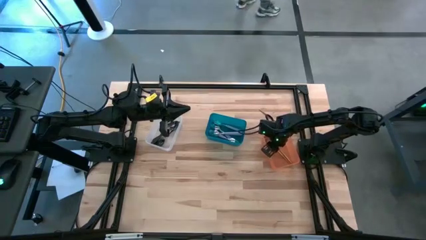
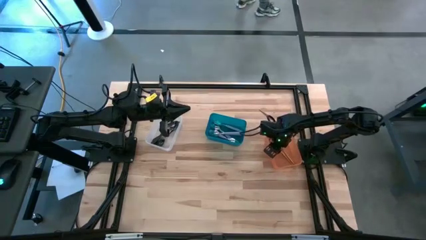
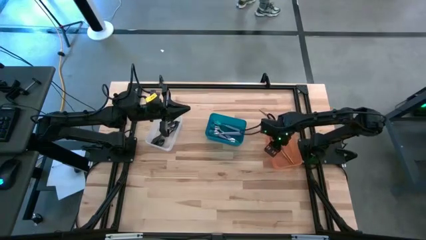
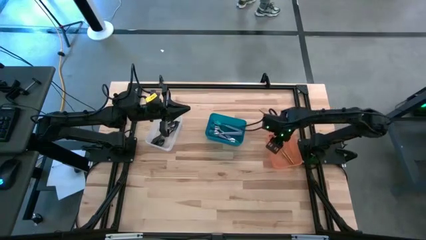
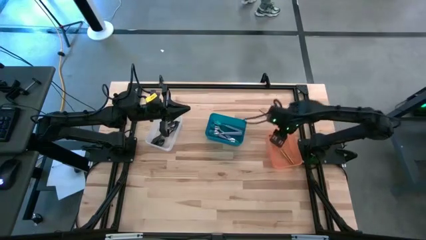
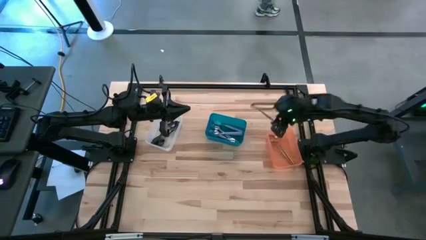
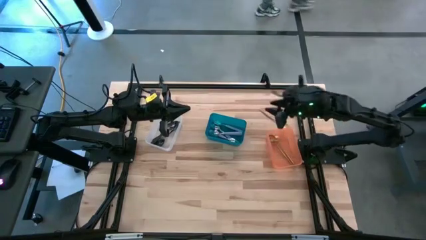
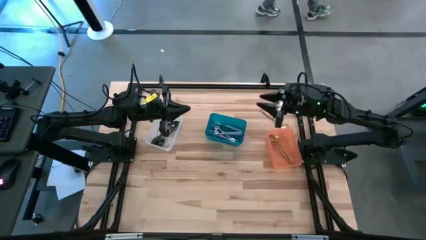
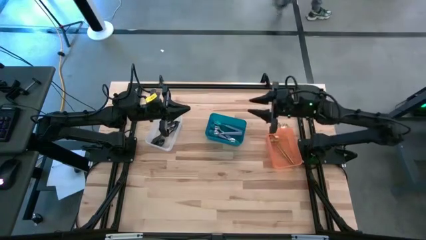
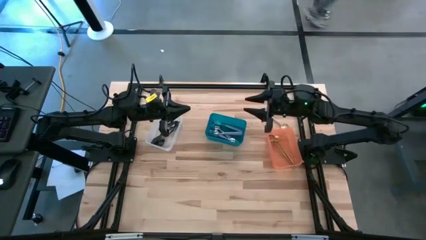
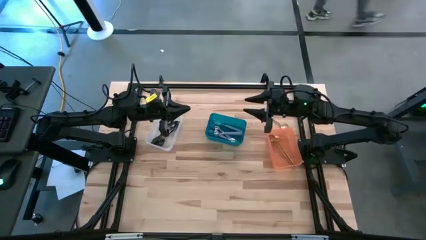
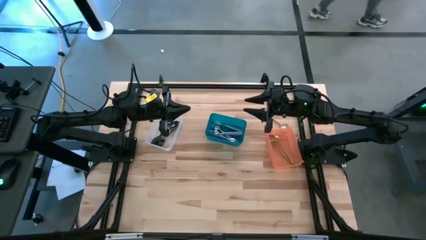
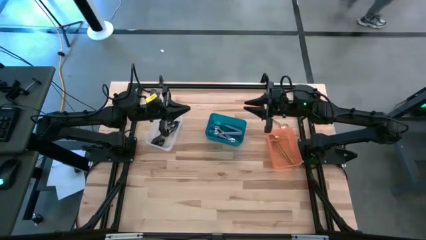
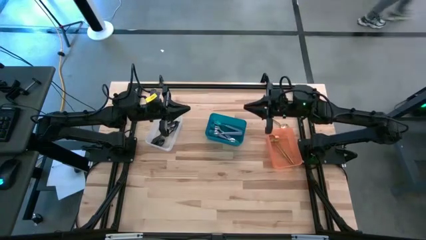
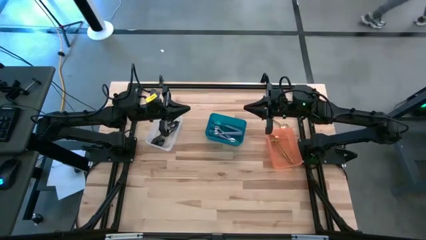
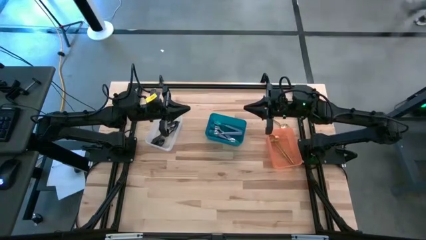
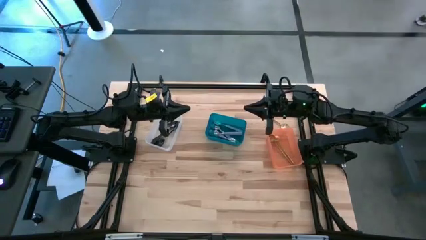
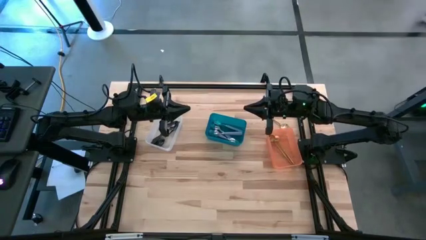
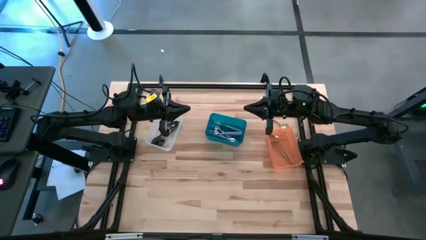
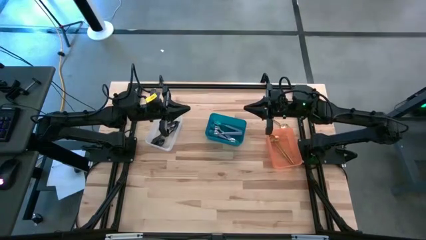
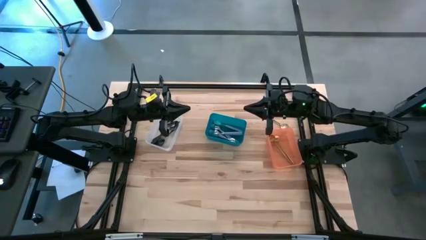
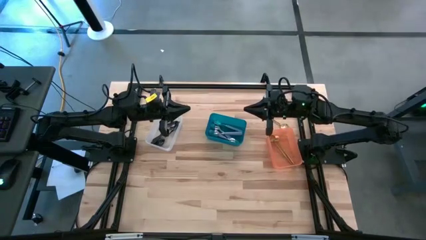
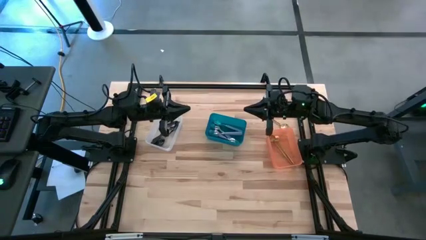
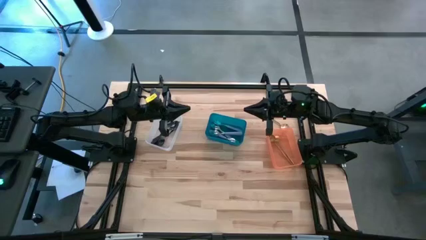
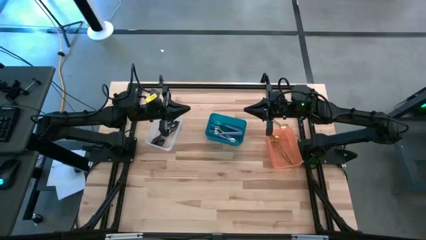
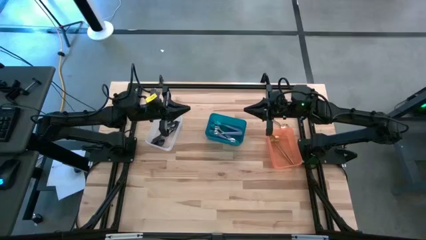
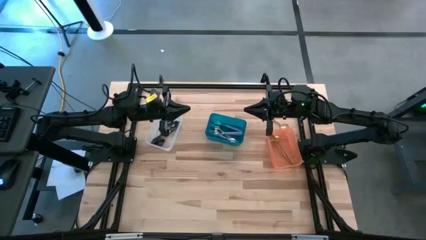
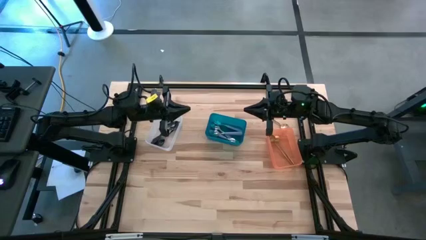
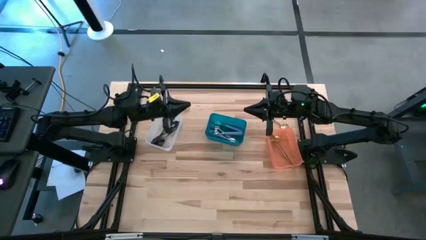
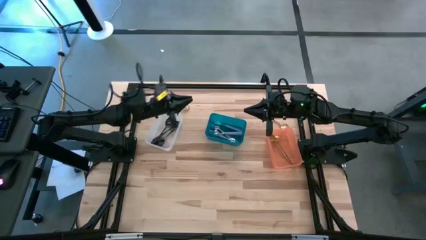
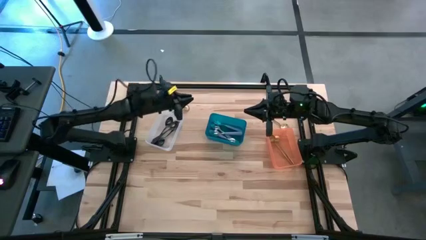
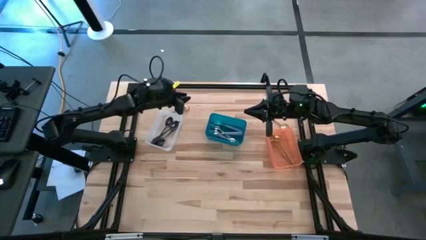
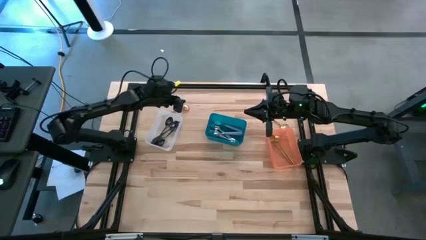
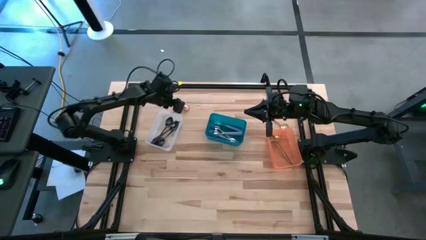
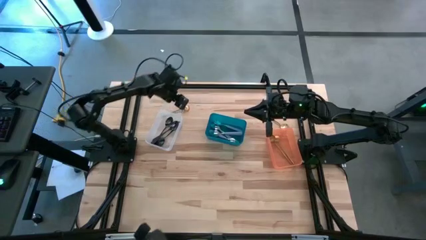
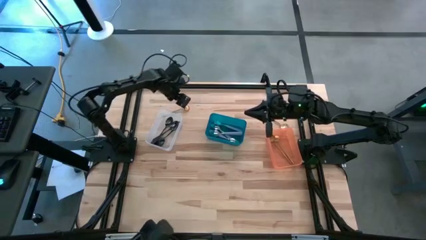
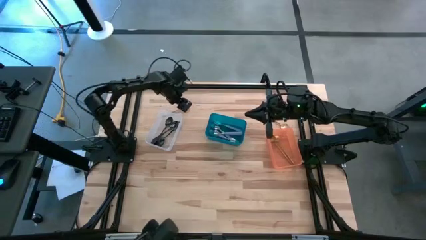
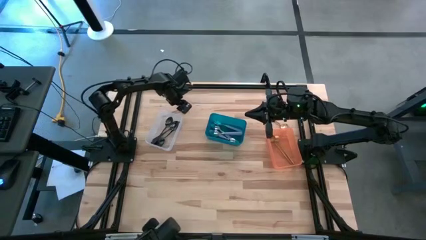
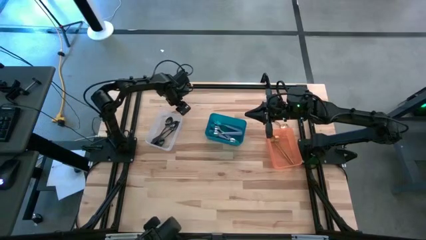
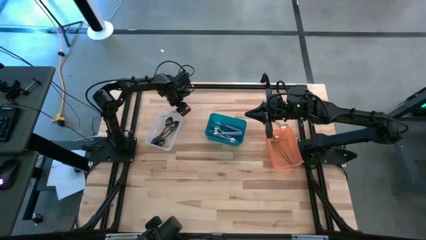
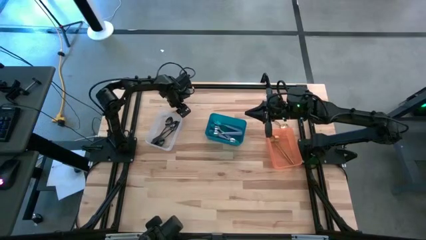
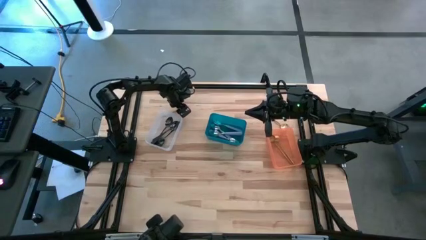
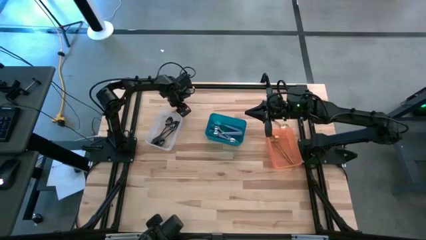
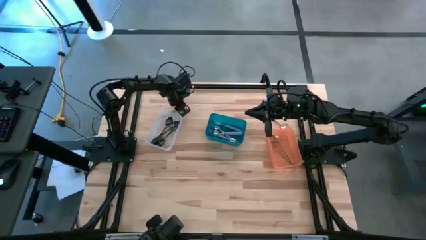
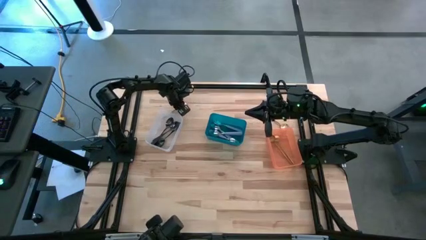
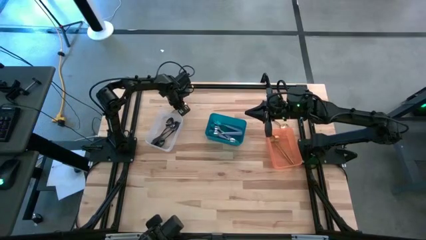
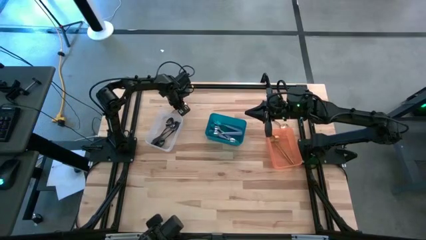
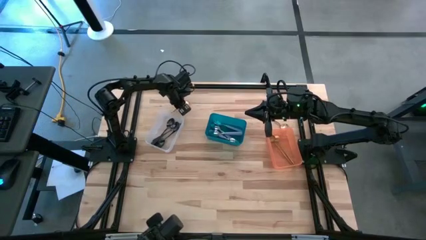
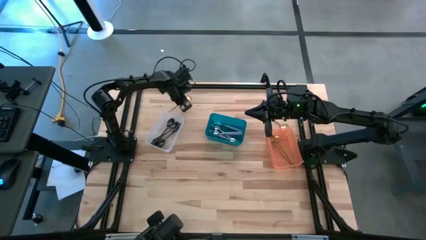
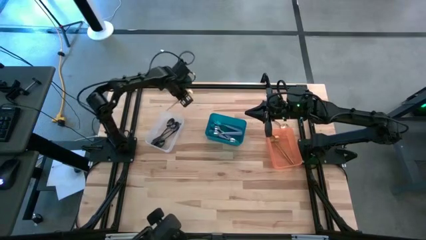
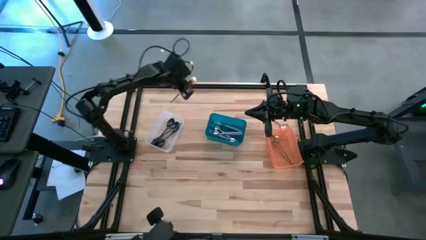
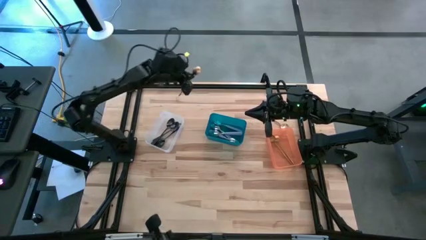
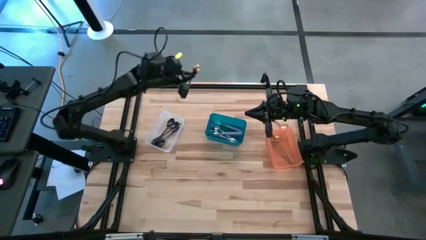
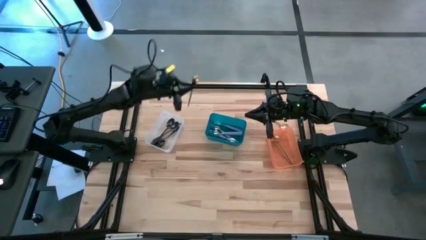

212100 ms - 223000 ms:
Task: Sort silverware by color (type)
Put the gold spoon into the orange bin
